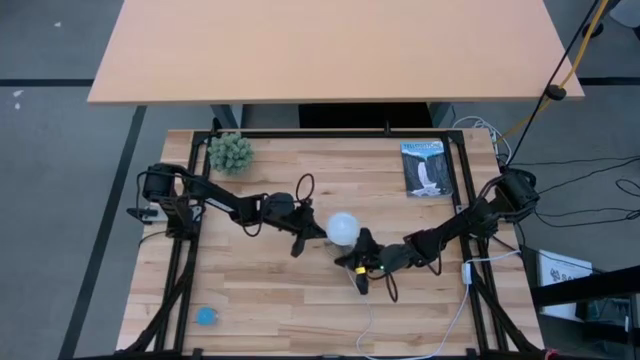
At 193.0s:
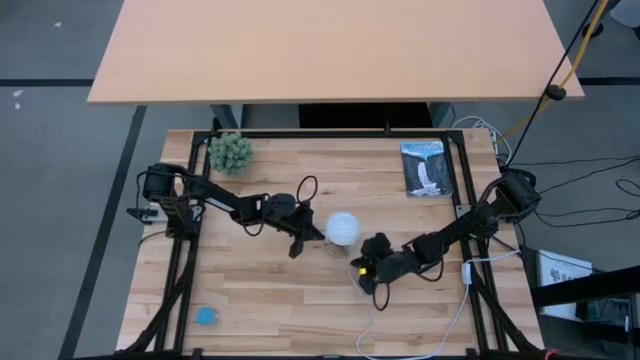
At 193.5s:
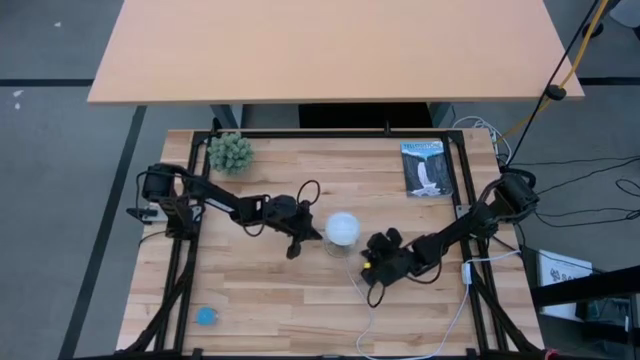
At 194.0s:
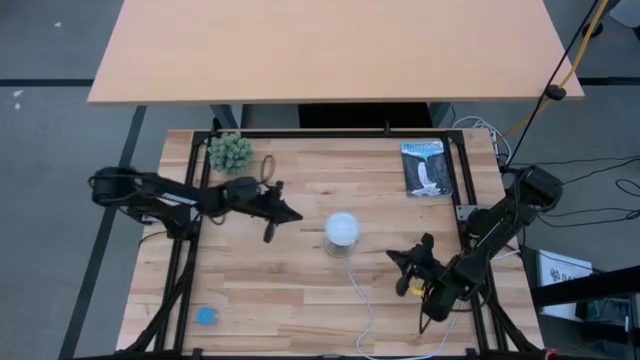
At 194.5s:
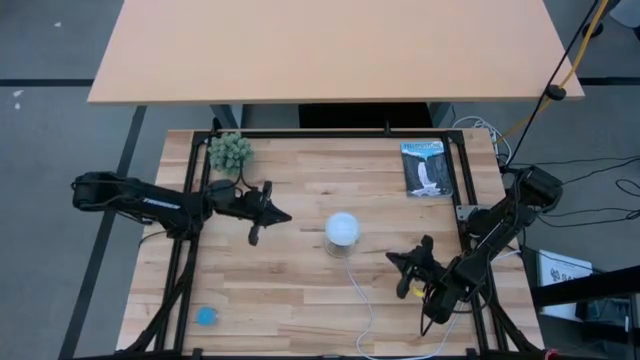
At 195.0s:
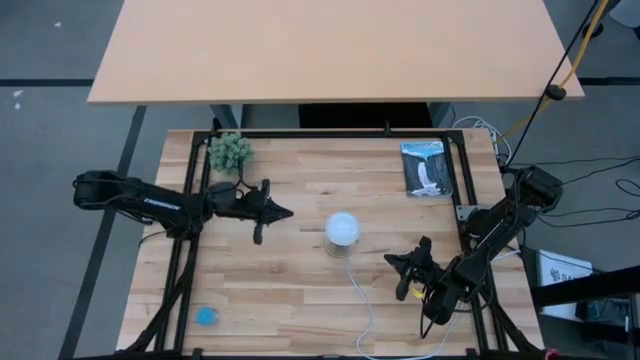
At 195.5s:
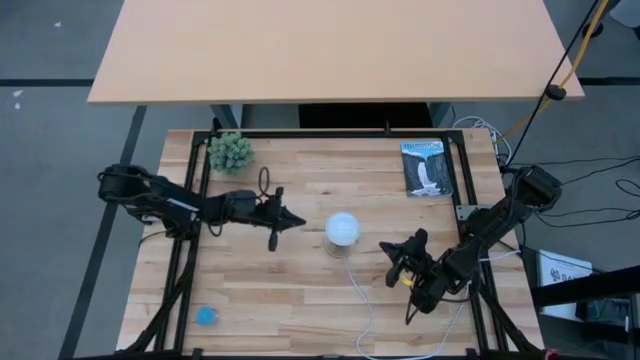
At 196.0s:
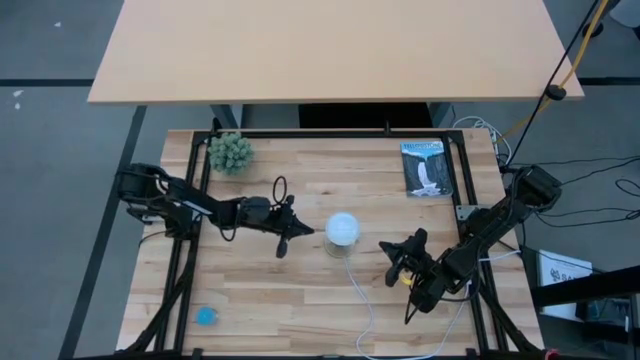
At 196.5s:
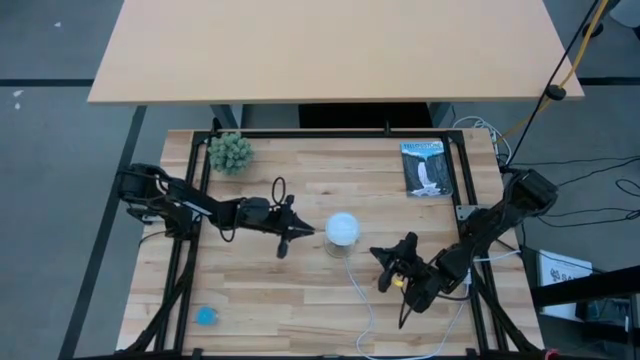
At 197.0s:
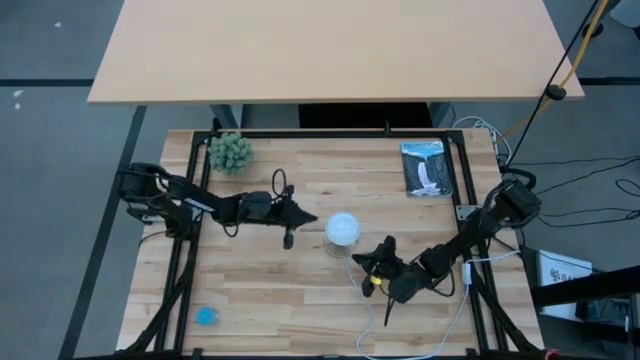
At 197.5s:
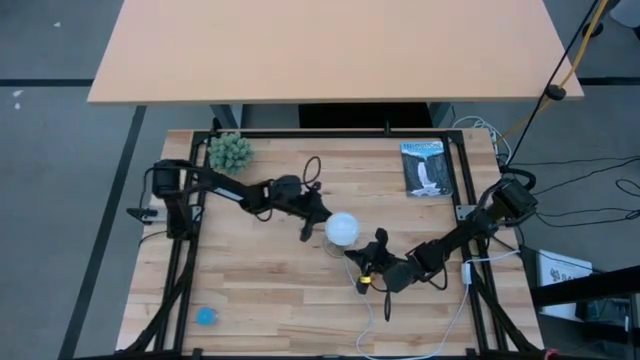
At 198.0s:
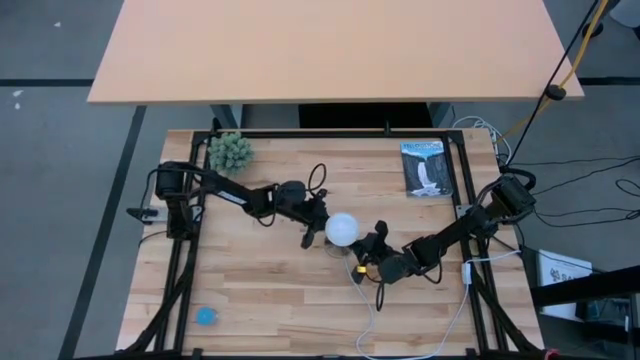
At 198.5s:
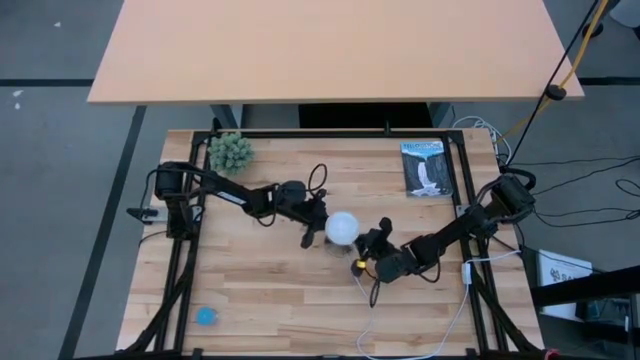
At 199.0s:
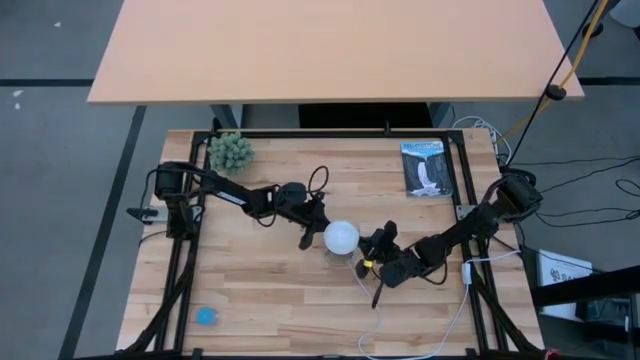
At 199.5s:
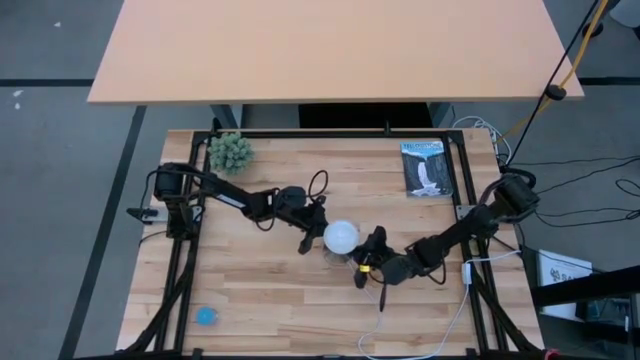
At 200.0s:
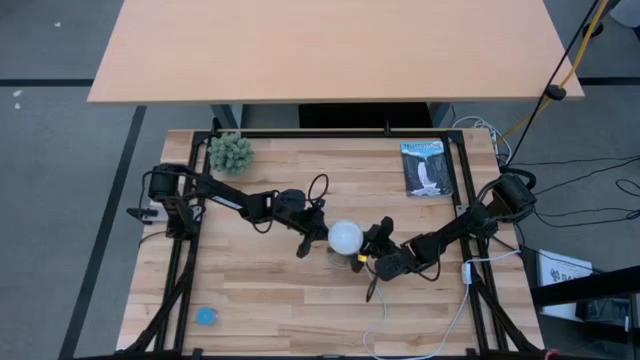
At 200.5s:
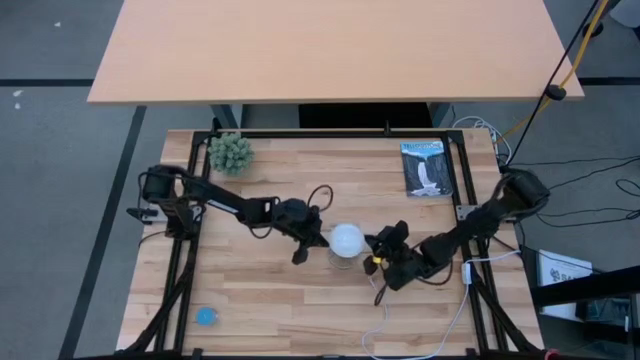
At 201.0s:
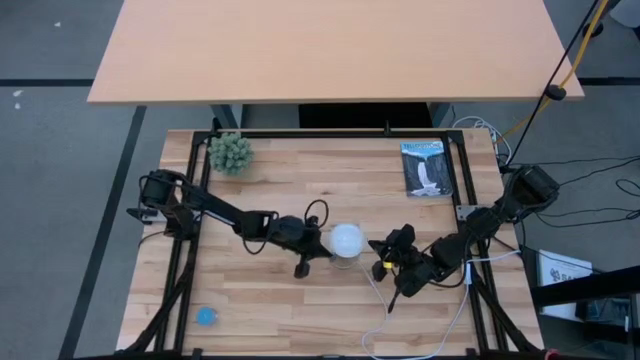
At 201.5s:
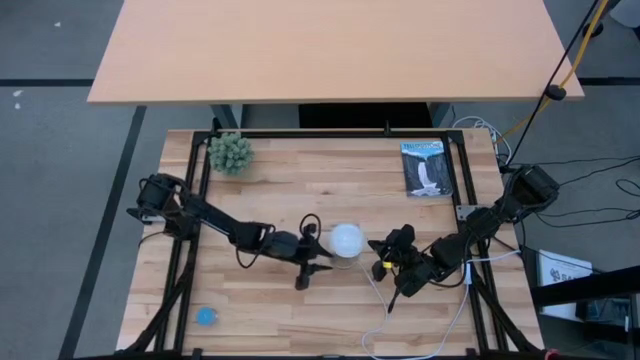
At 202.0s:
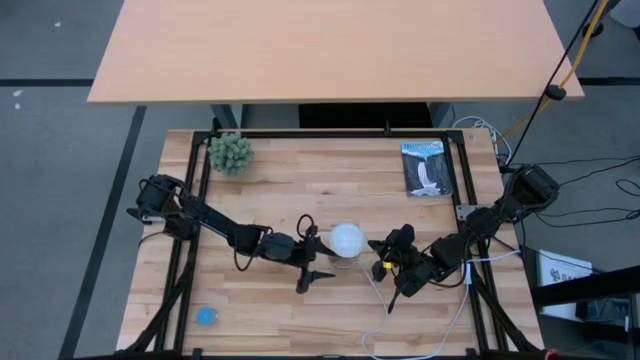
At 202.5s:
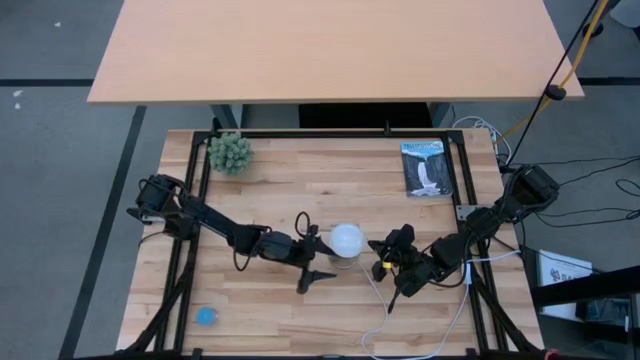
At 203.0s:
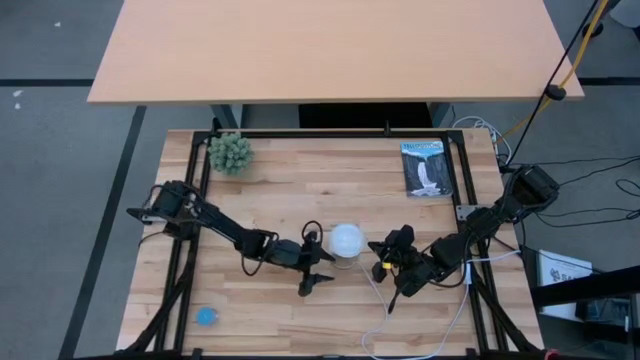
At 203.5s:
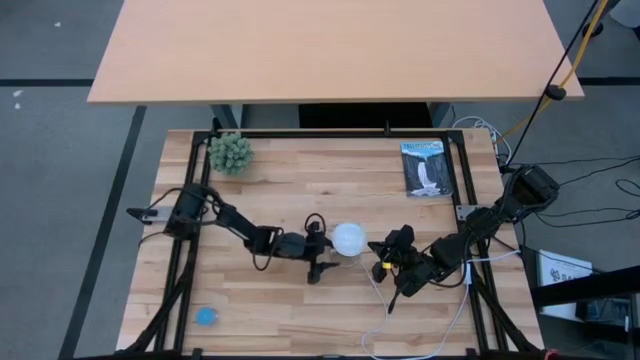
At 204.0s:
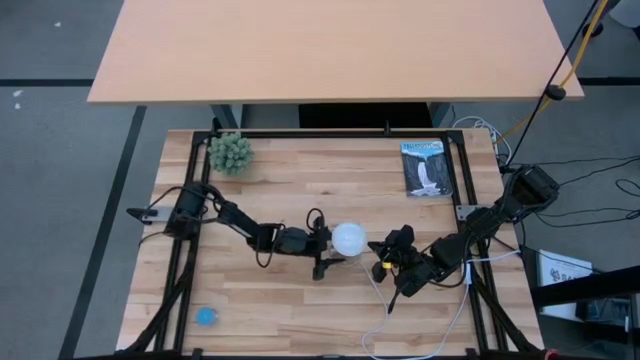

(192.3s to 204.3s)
Task: Screw lightbulb
Remove the white light bulb from the gold lamp

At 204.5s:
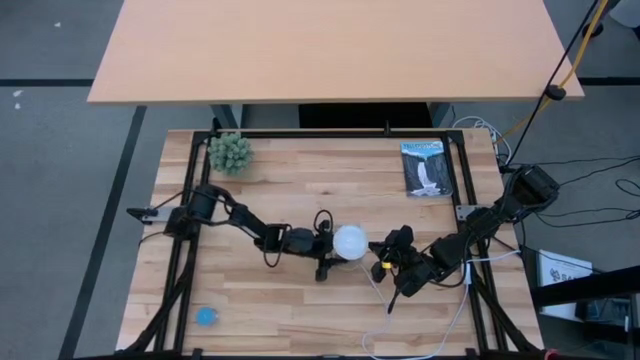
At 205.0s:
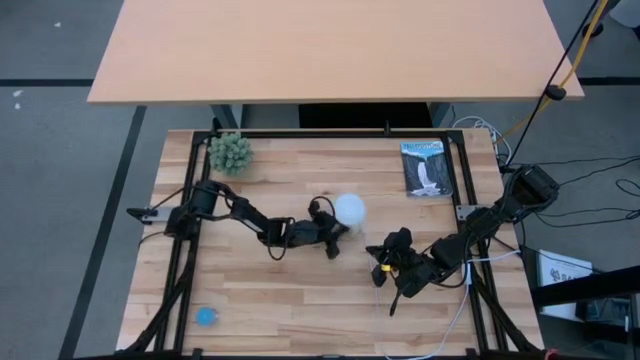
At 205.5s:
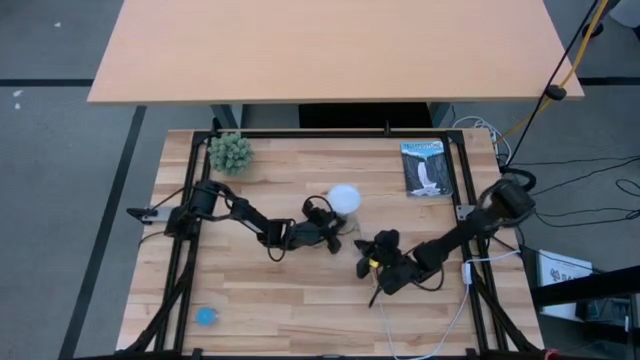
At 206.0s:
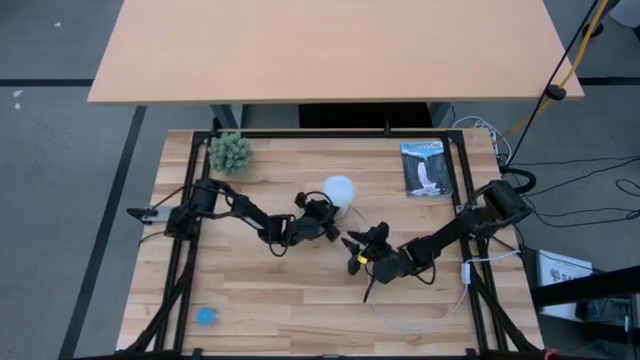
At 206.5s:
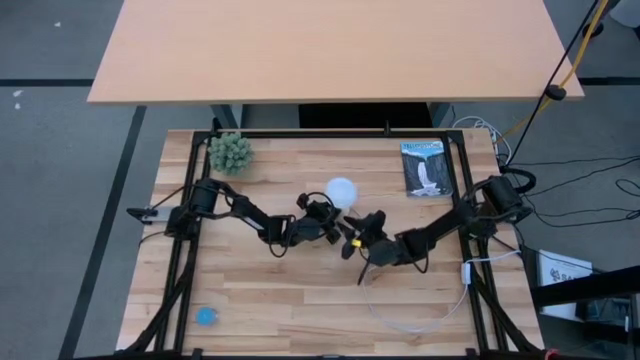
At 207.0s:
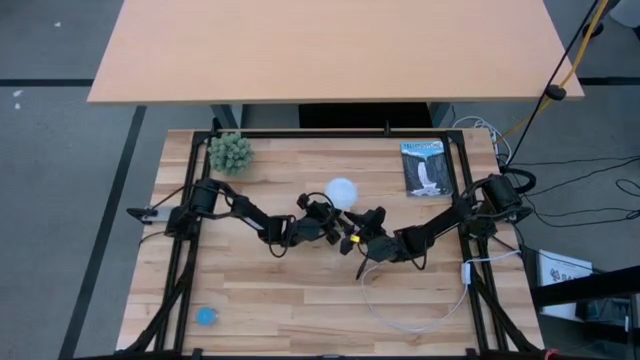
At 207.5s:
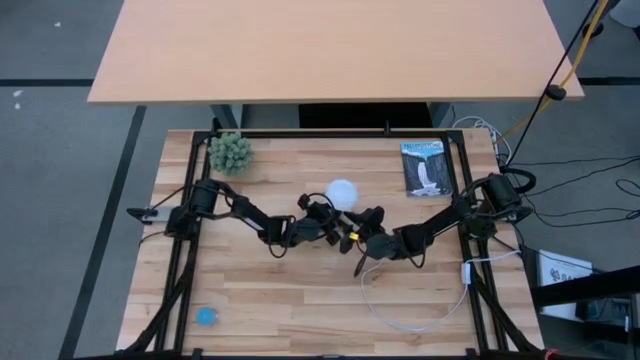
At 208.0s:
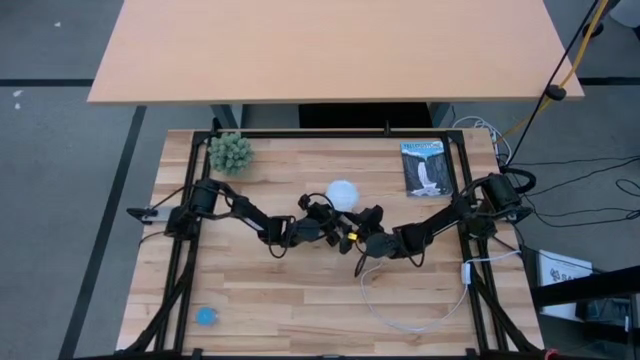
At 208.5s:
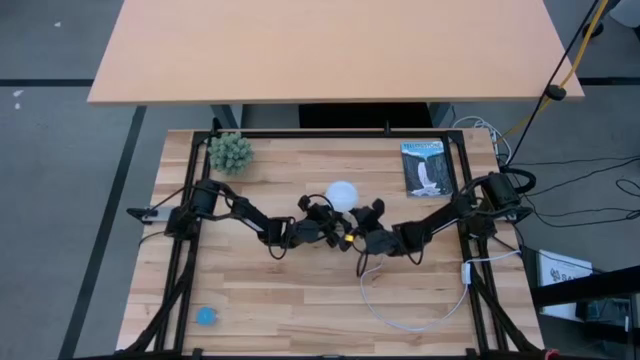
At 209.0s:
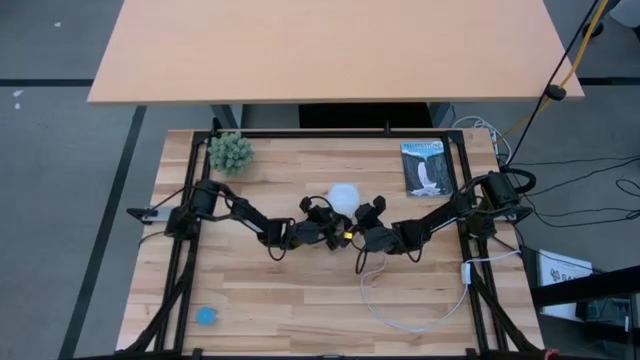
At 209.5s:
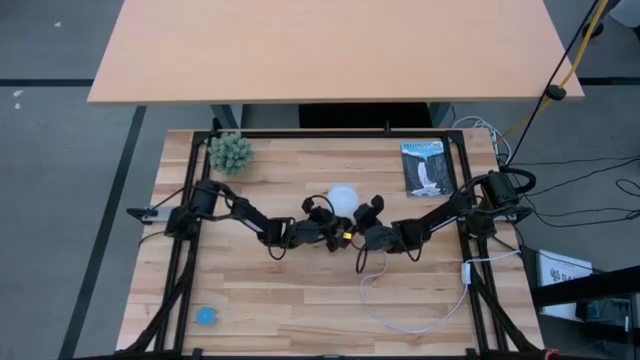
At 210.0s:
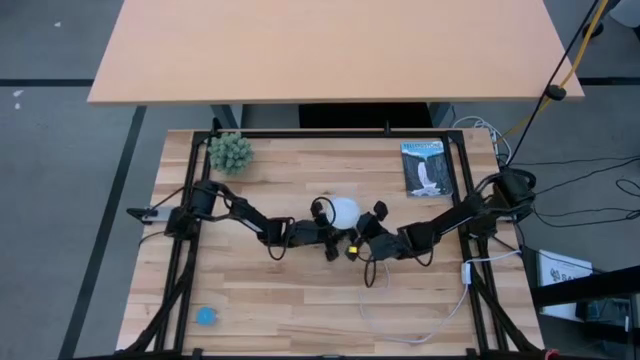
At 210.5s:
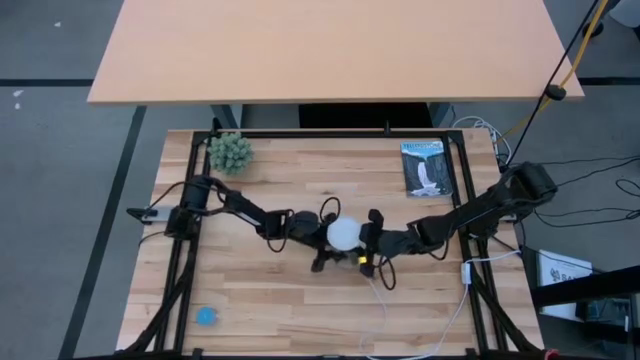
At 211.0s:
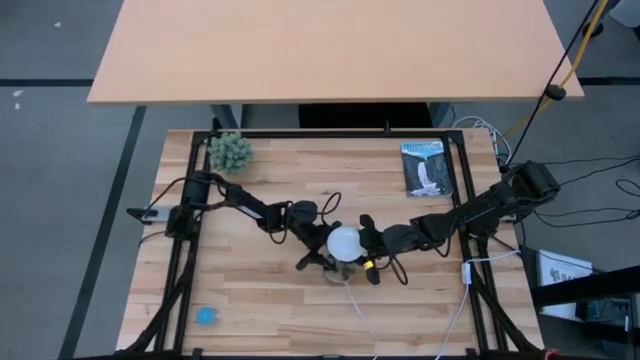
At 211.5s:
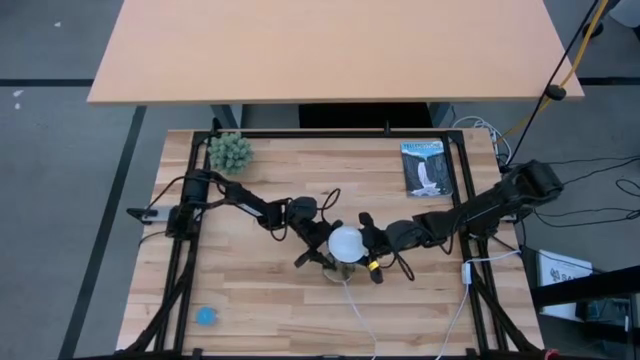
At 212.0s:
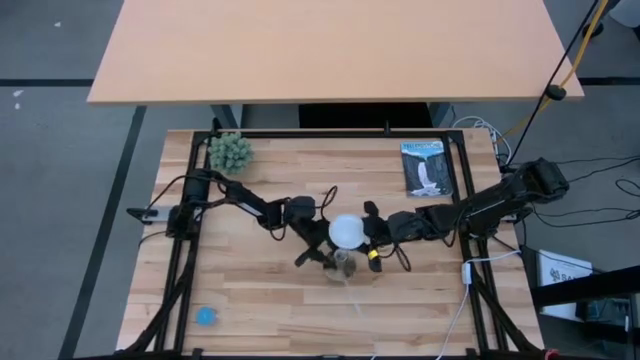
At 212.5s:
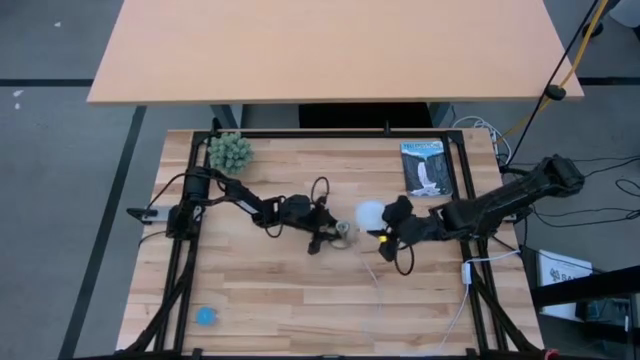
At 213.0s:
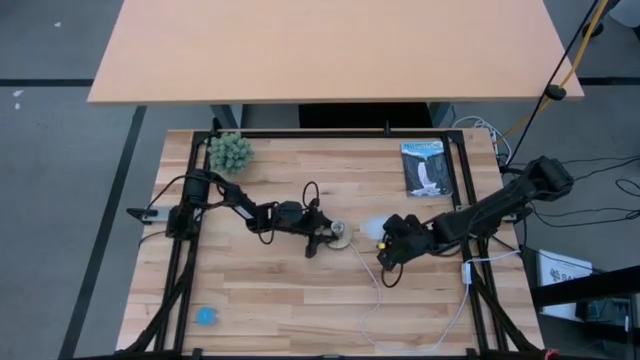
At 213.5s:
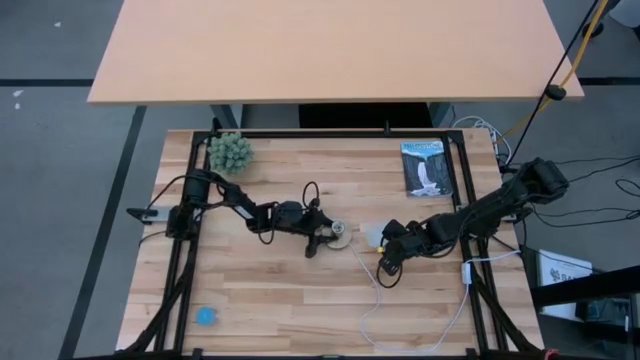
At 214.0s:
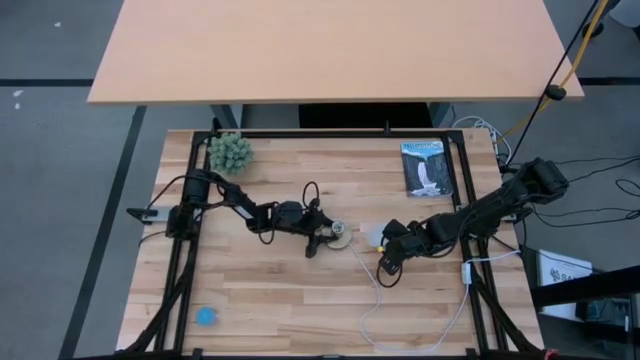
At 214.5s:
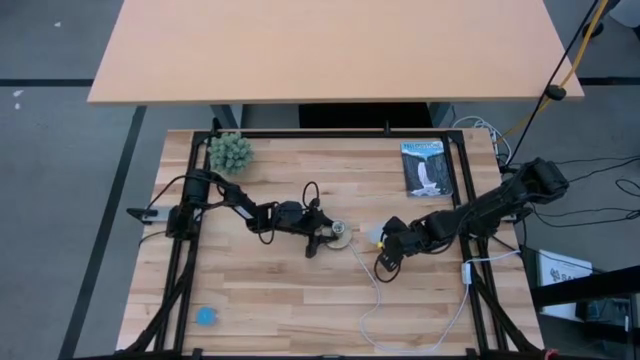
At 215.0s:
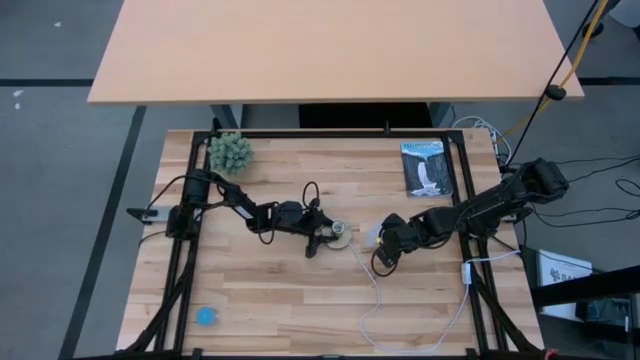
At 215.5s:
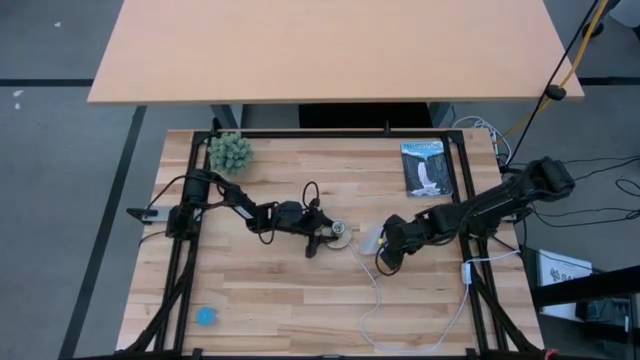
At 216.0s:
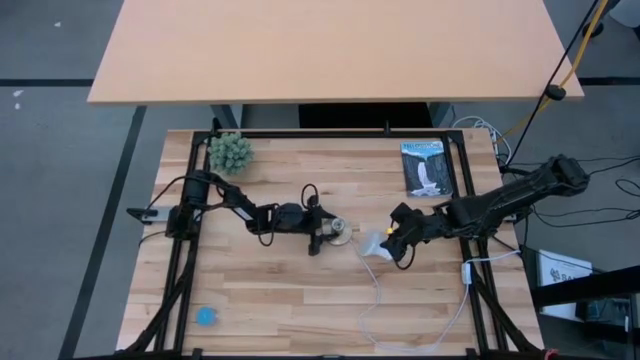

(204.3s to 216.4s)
Remove the white light bulb from the gold lamp
